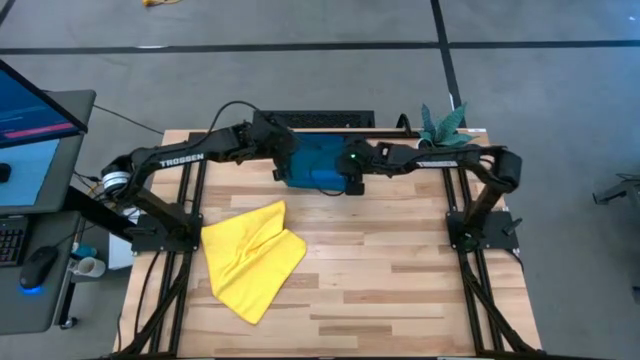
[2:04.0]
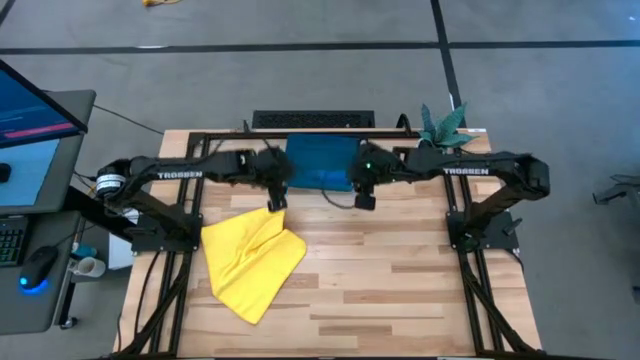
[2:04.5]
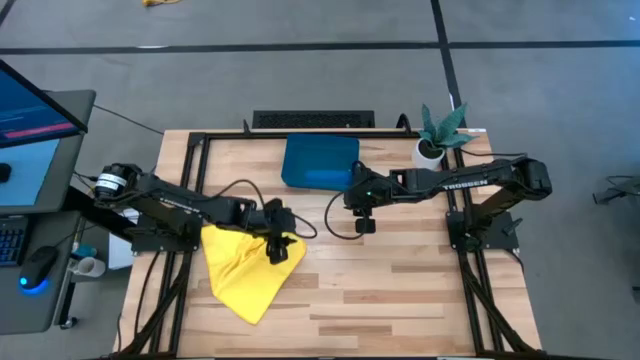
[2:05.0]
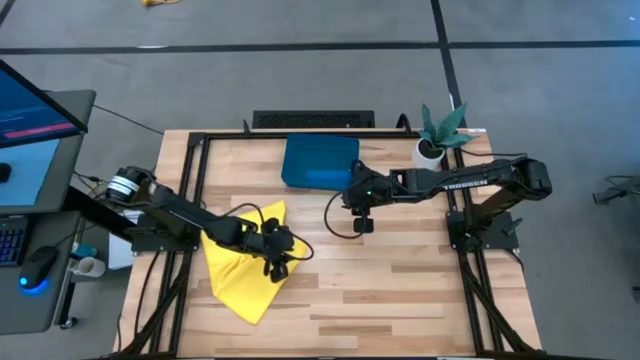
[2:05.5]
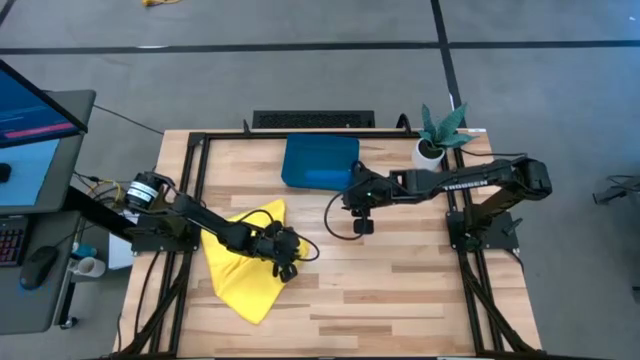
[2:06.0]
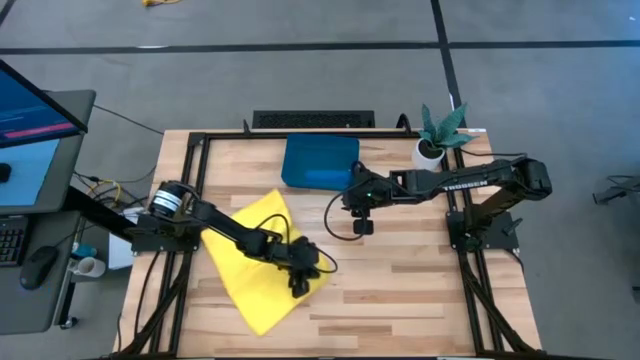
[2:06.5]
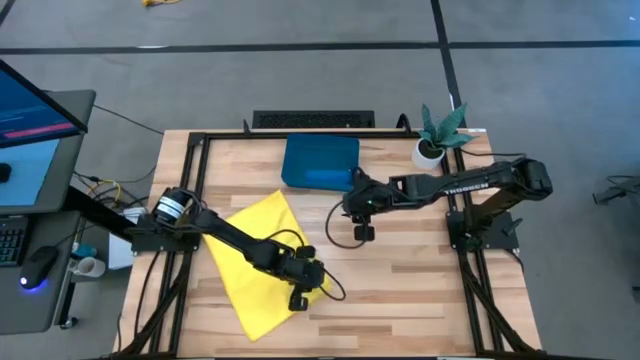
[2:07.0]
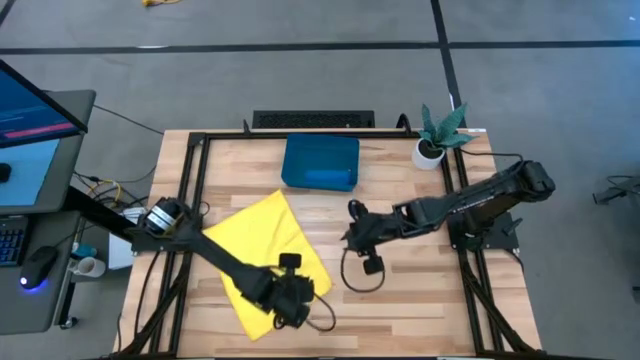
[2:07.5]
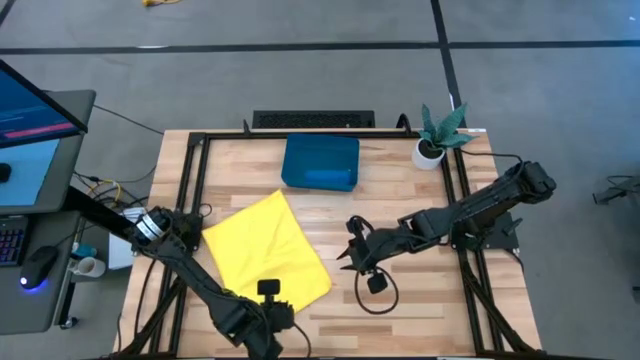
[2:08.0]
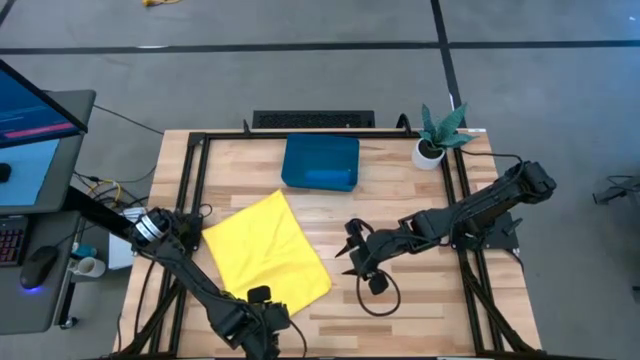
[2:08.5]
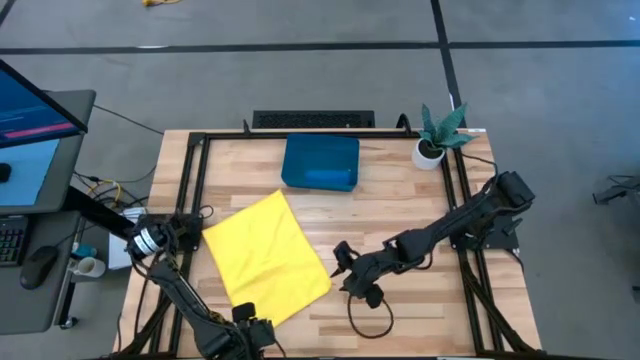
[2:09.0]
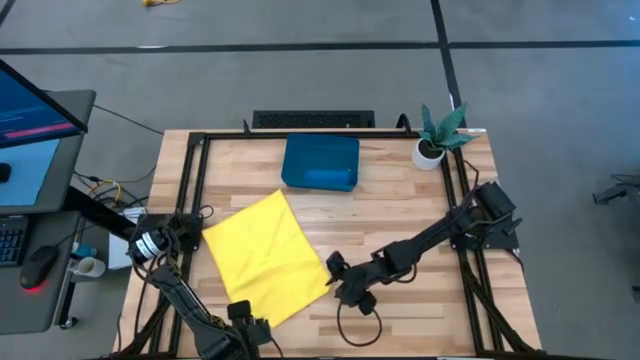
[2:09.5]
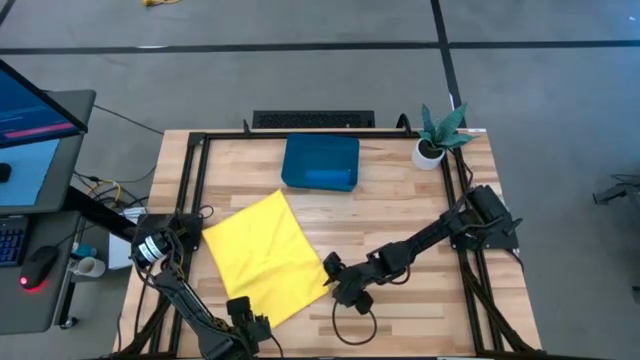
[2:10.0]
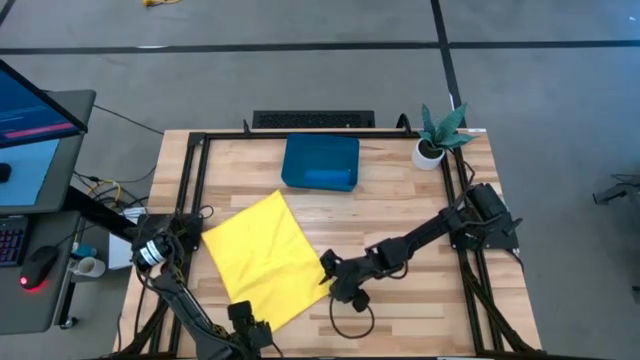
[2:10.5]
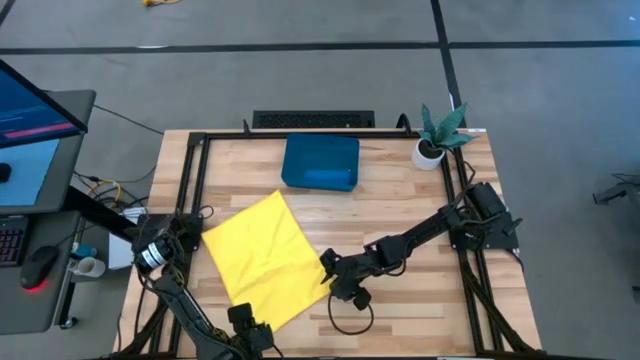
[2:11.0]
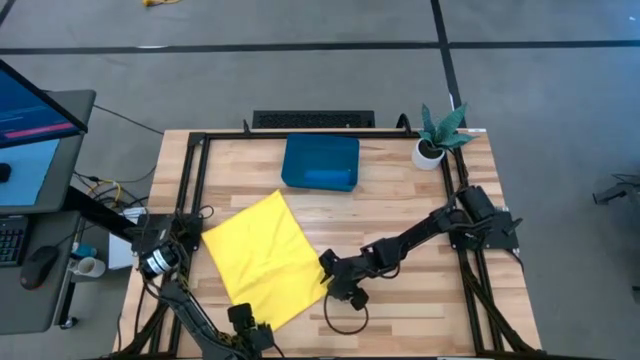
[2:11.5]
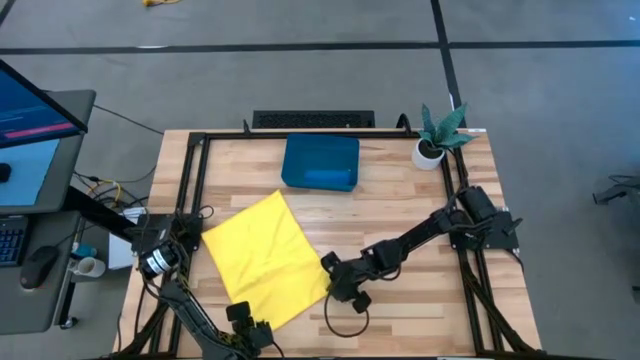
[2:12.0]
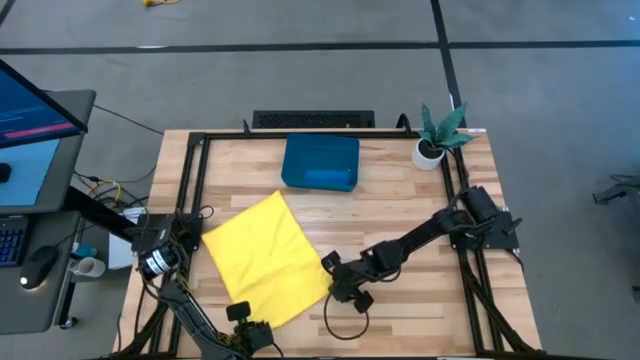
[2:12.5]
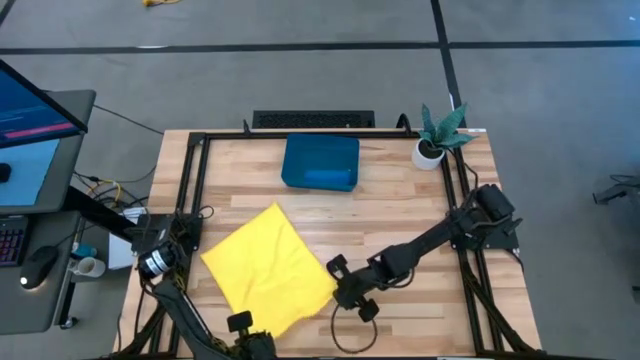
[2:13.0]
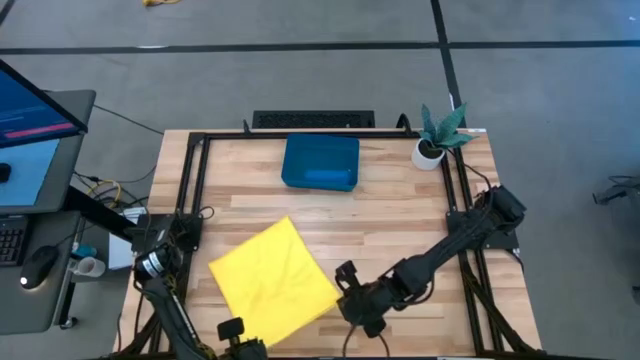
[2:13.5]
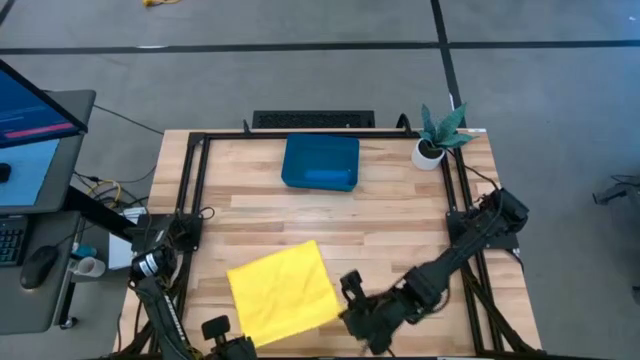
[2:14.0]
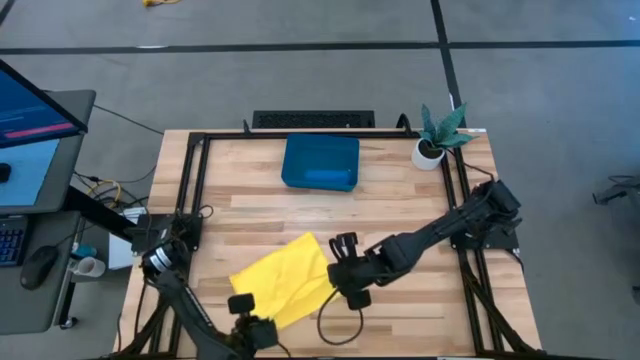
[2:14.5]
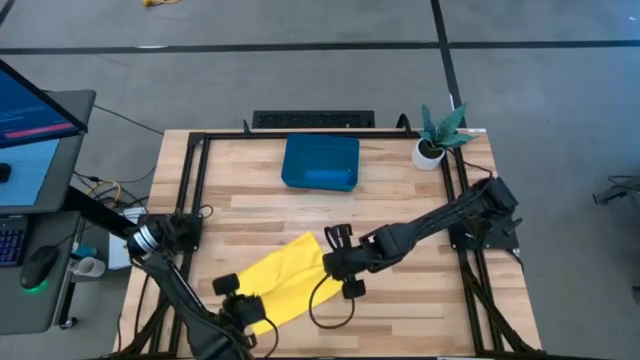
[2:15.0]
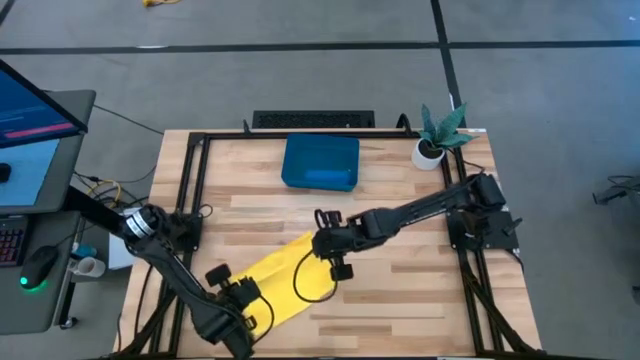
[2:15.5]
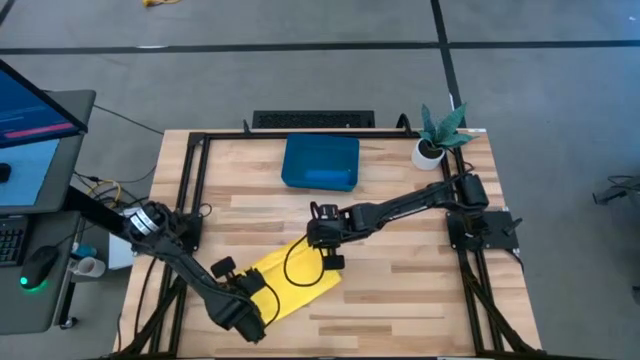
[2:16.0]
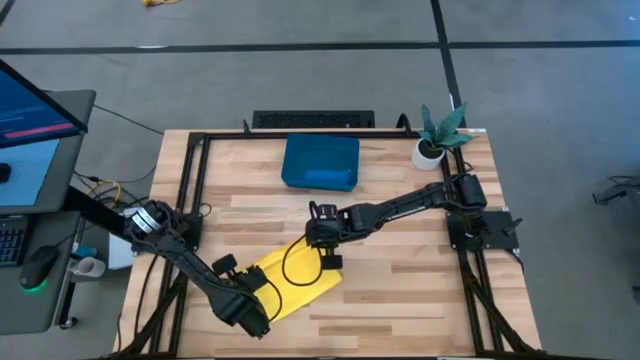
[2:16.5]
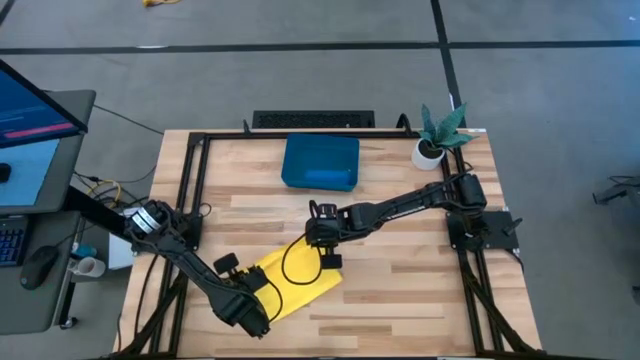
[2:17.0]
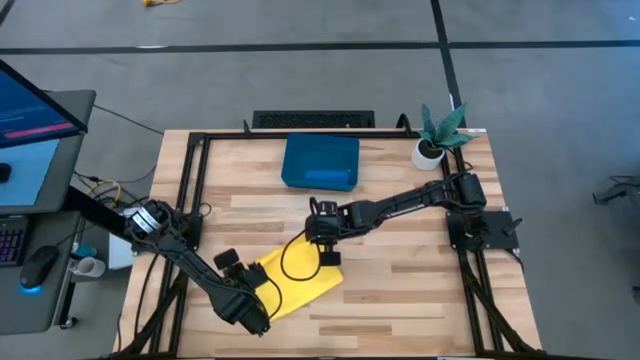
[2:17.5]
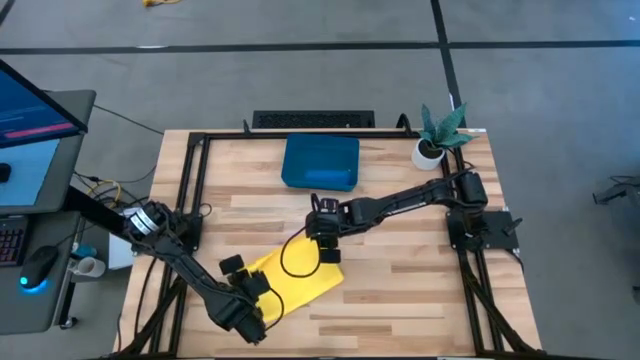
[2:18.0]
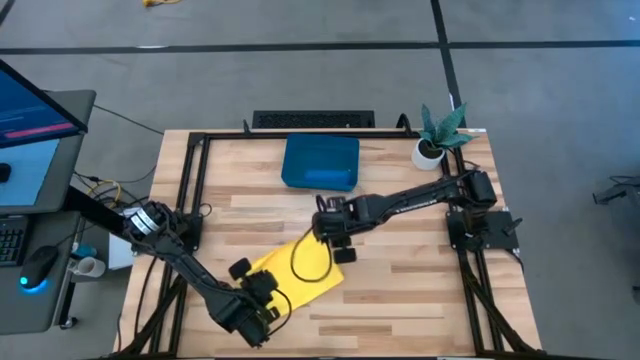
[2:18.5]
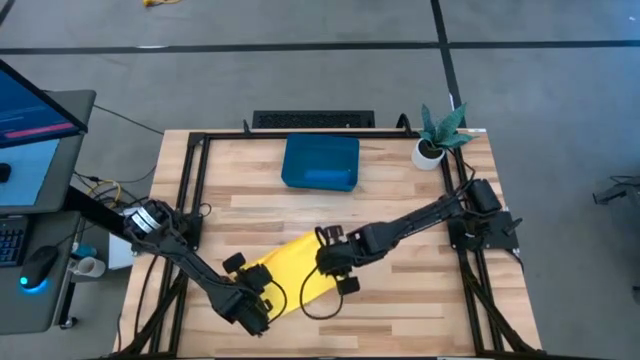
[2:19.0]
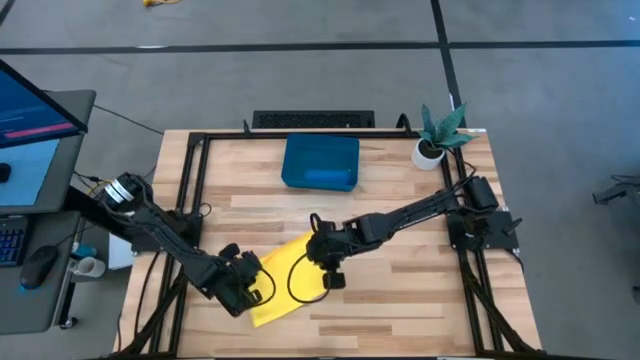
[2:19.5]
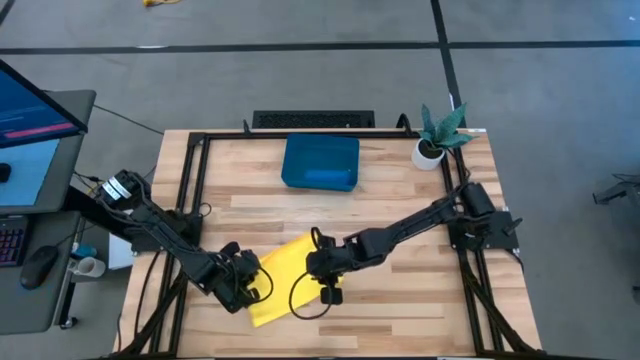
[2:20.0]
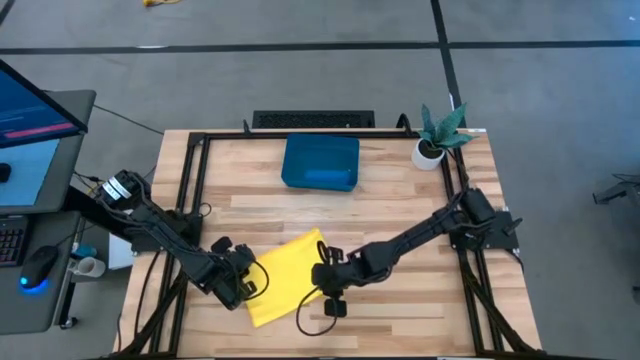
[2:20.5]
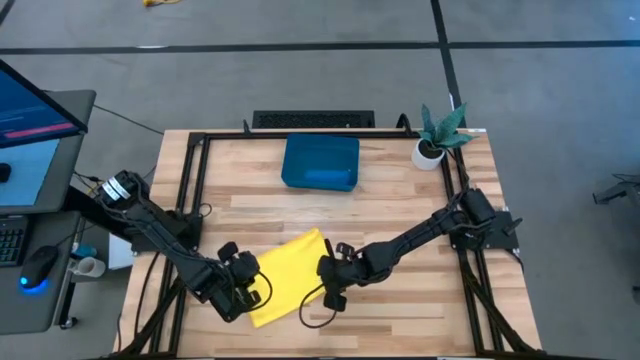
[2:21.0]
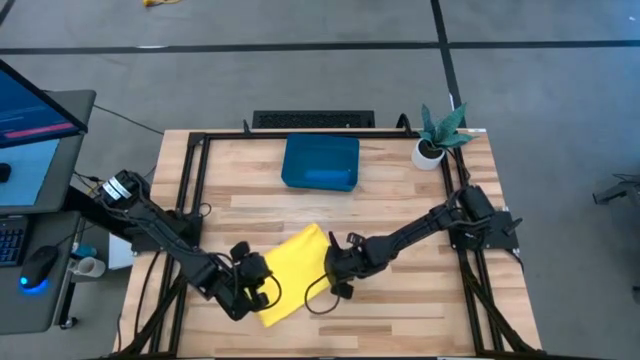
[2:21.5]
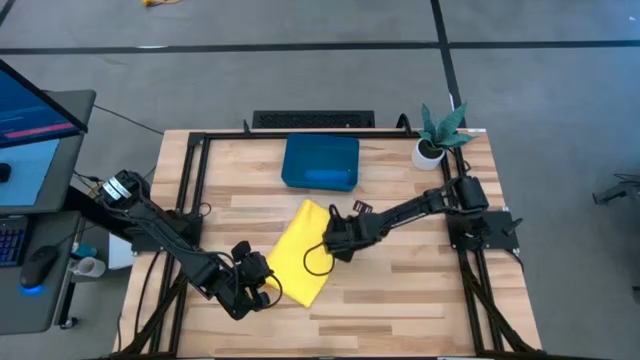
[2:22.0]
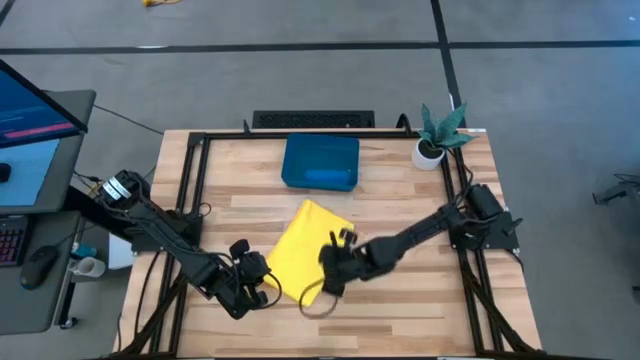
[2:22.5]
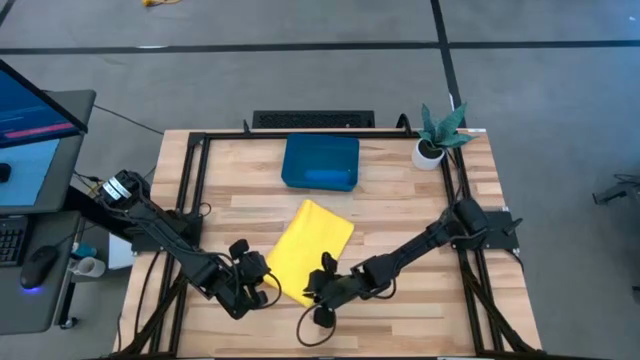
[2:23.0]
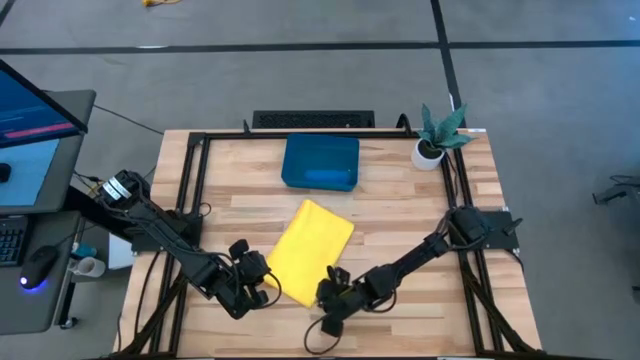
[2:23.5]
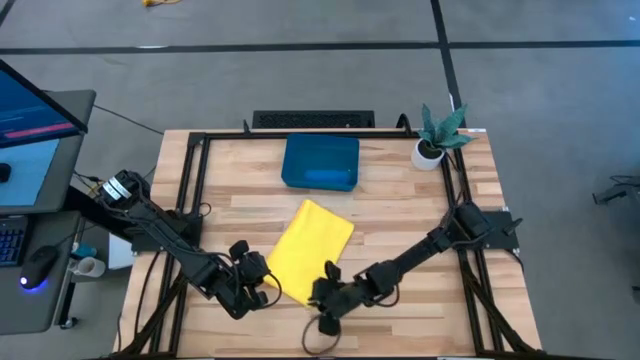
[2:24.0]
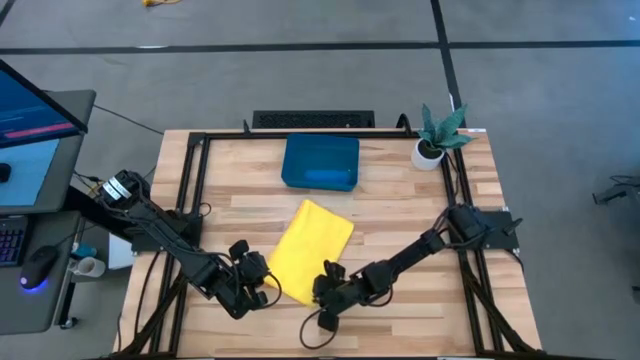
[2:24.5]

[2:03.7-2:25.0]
Task: Roll microfiber towels into tight, uniform cylinder then place into a basket
Roll the yellow microfiber cloth
